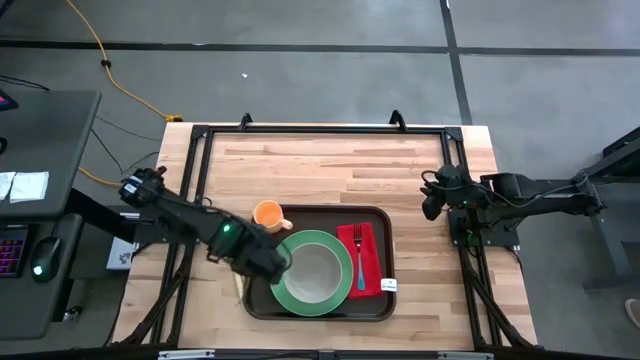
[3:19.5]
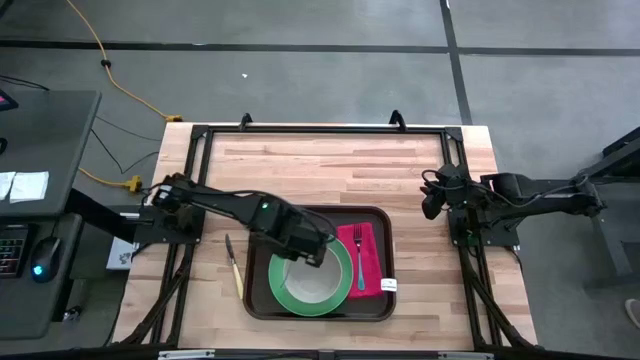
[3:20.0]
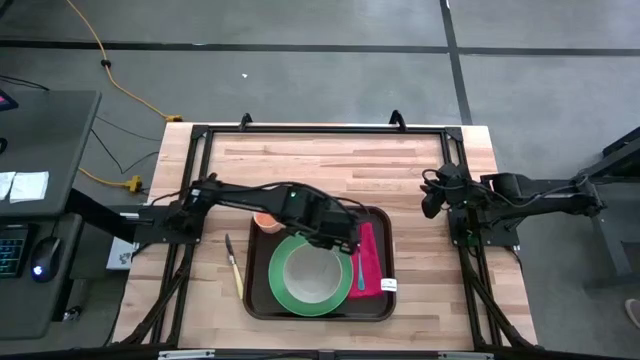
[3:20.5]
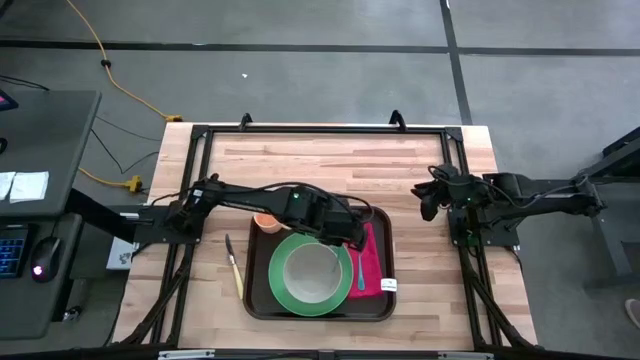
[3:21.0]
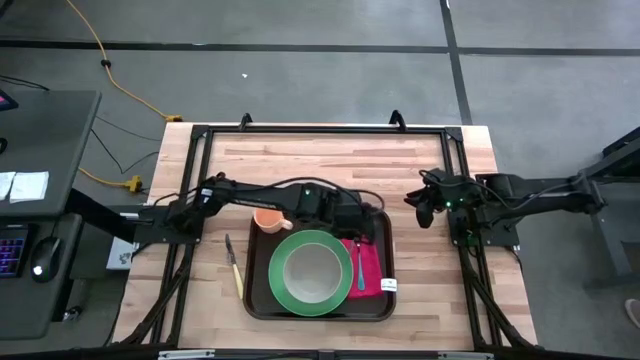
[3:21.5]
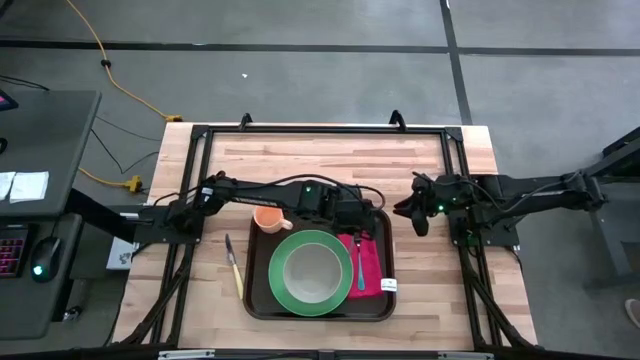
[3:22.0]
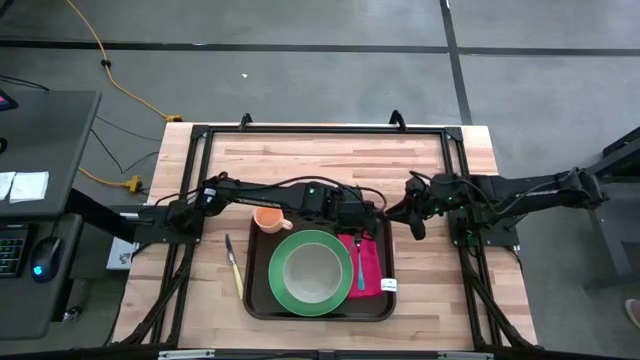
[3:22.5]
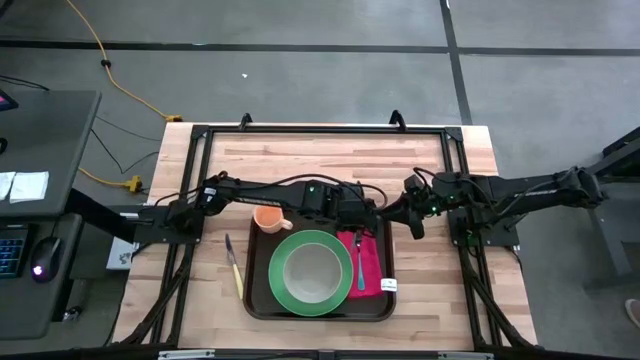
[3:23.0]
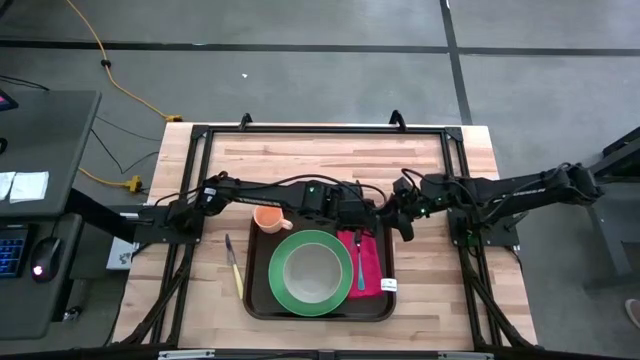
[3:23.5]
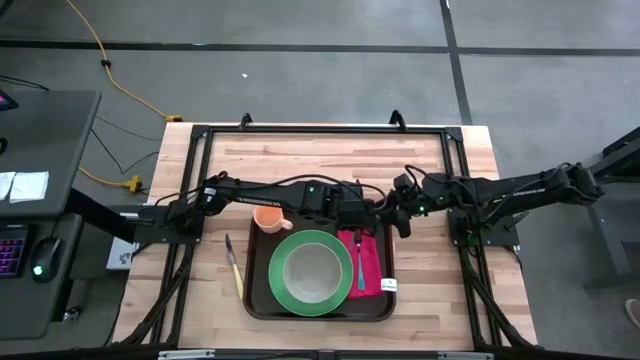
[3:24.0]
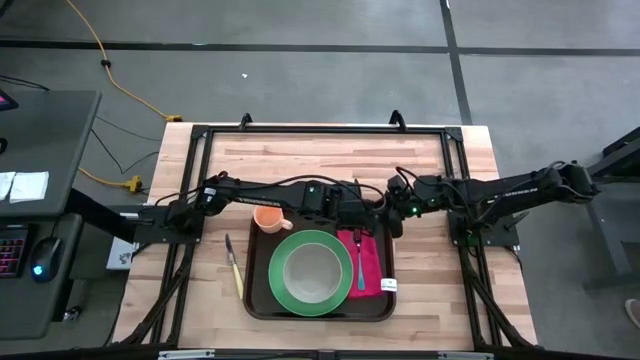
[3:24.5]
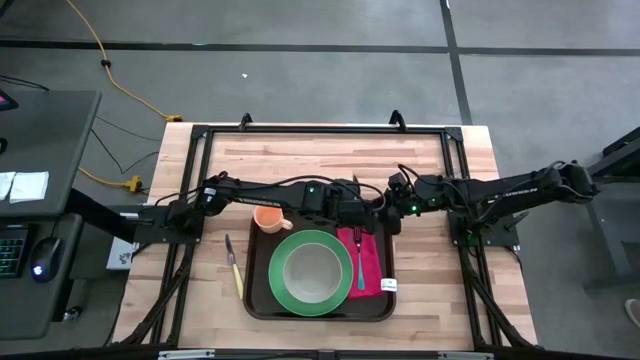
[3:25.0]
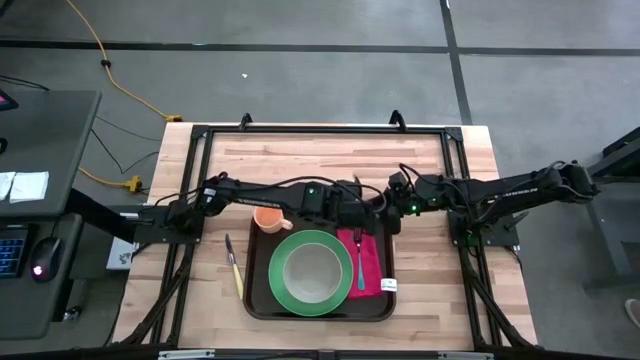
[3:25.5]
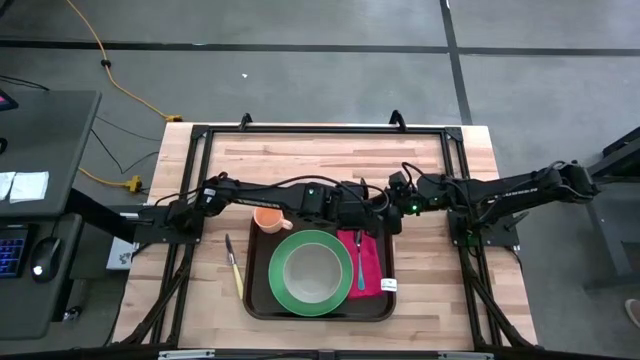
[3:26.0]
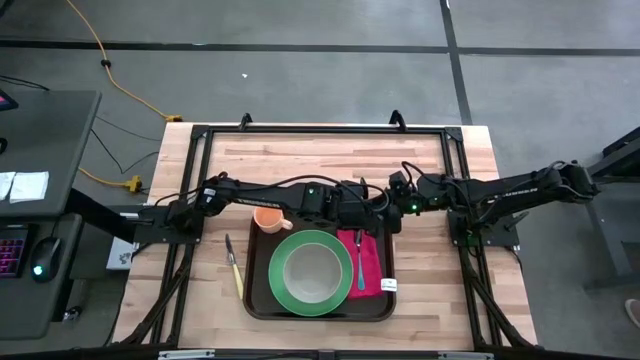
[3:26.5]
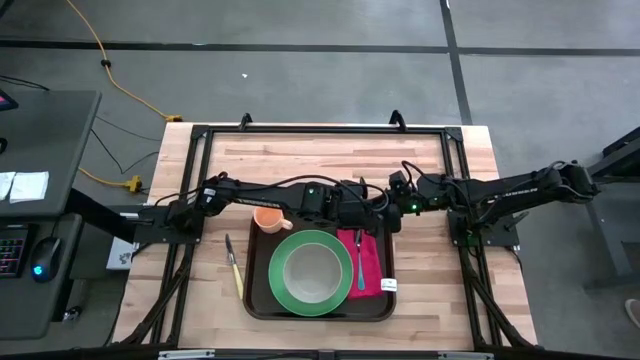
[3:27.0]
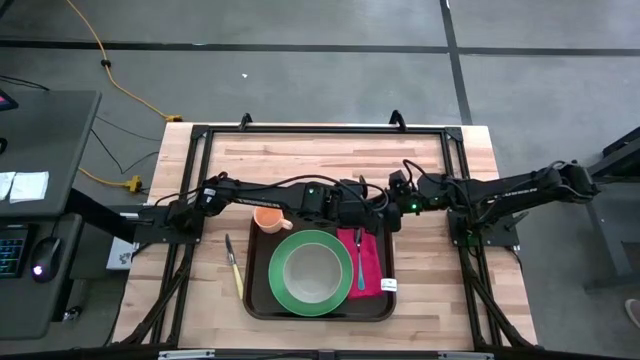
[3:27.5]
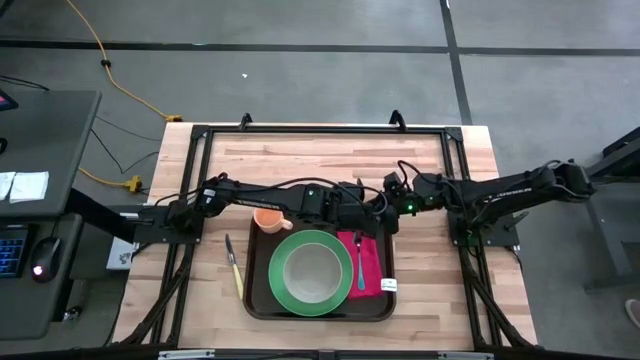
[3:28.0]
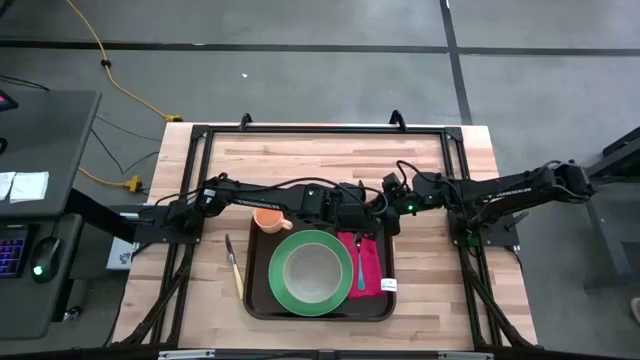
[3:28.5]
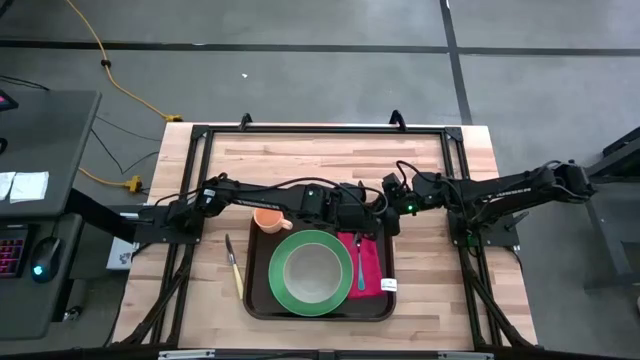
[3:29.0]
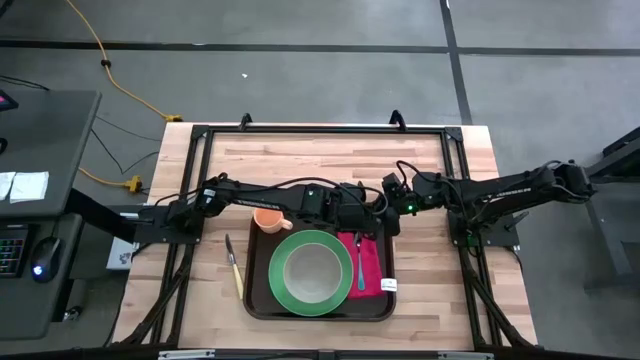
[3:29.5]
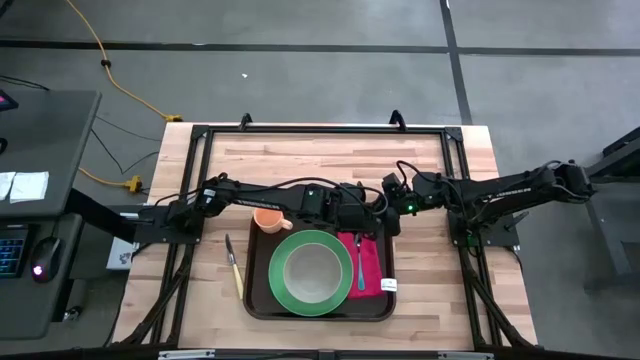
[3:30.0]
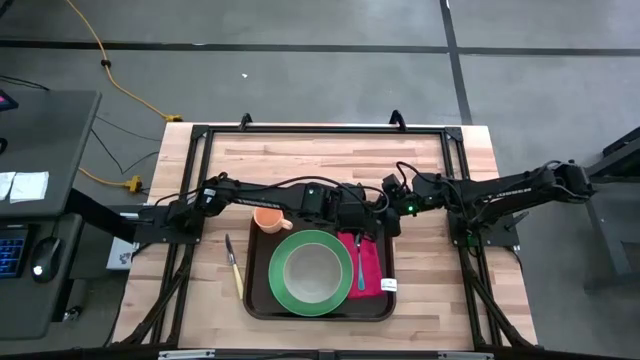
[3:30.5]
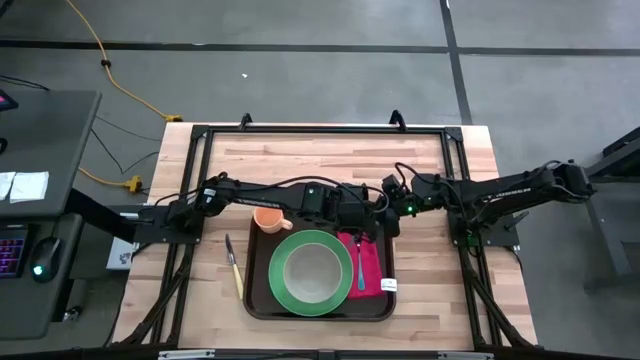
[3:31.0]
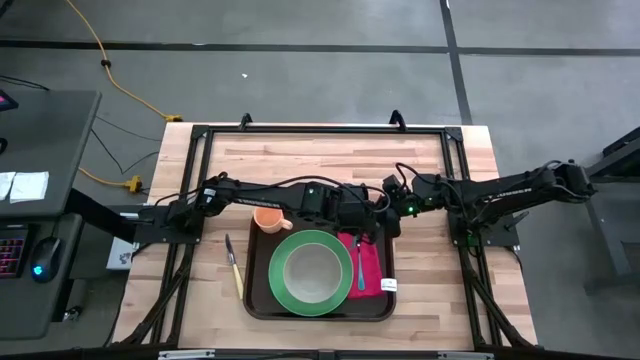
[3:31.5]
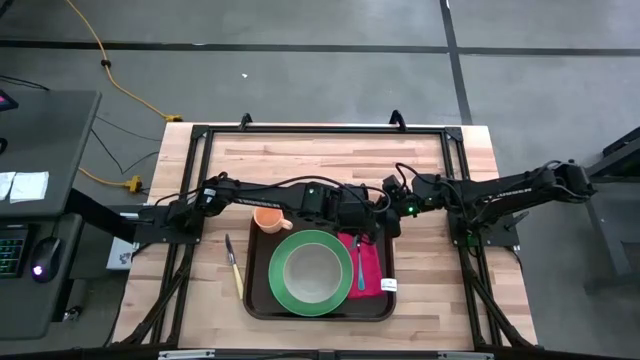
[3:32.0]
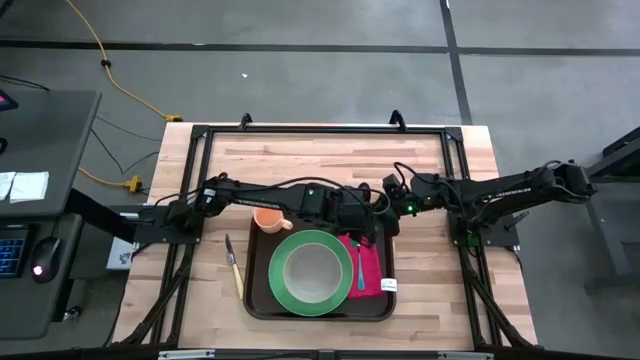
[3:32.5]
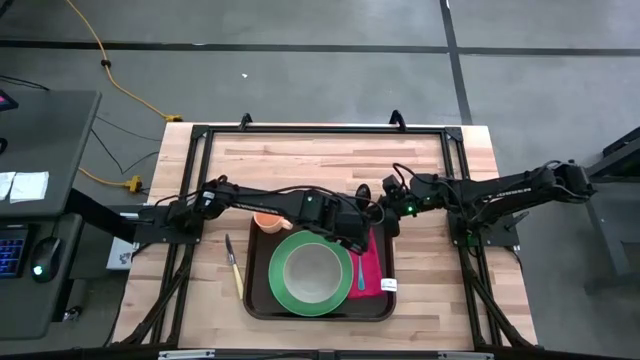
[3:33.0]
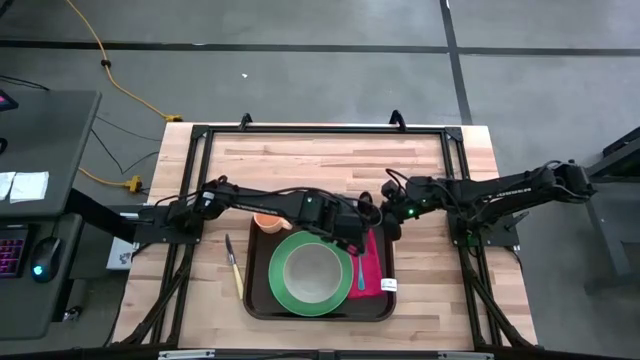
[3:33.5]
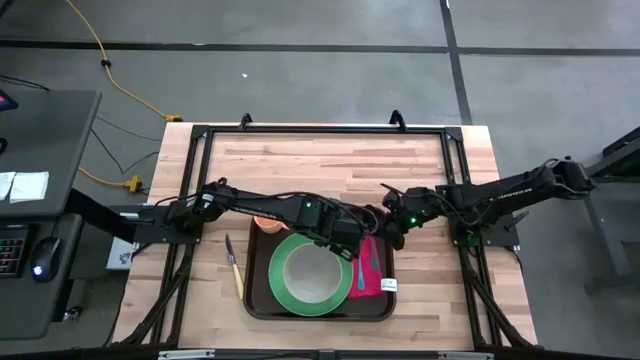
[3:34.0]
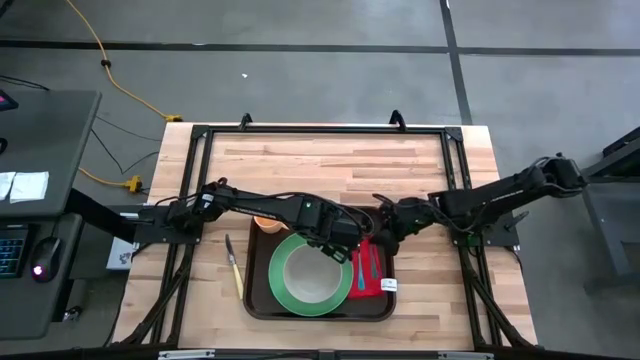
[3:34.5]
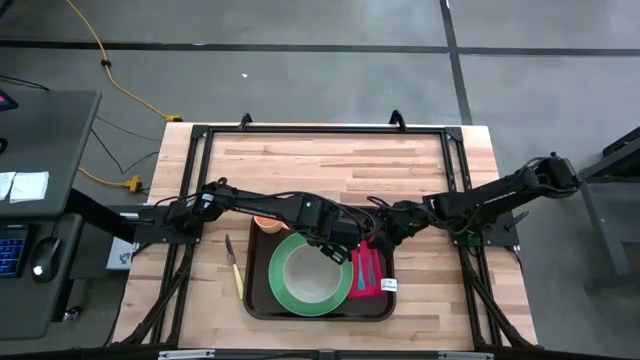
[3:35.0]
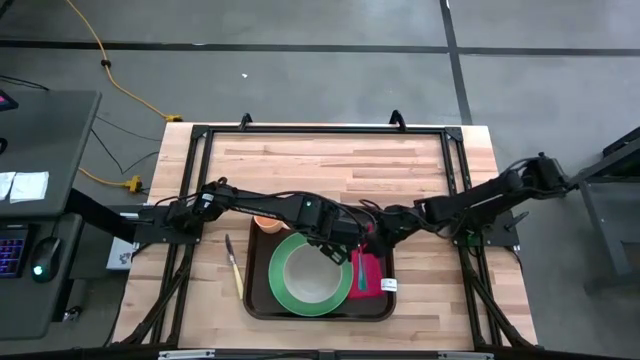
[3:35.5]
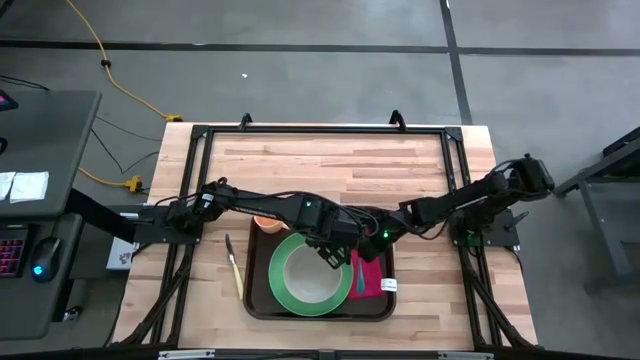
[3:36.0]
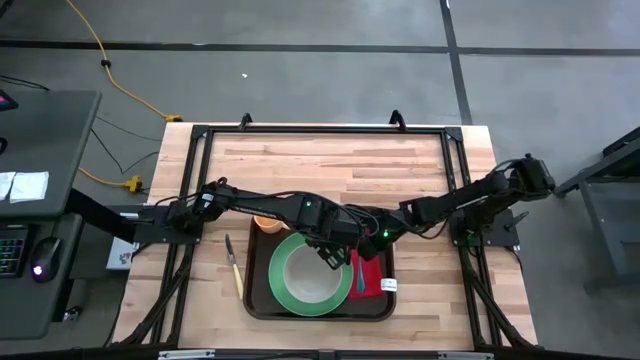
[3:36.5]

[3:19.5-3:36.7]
Task: Set up tray
Put the blue spoon on the red table napkin to the left of the blue fork

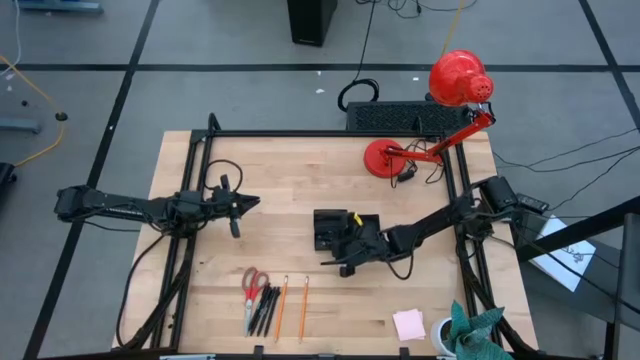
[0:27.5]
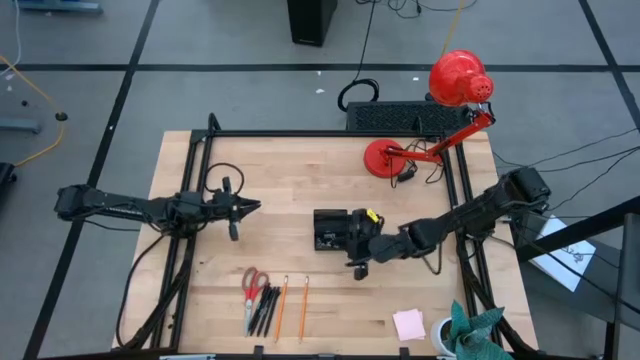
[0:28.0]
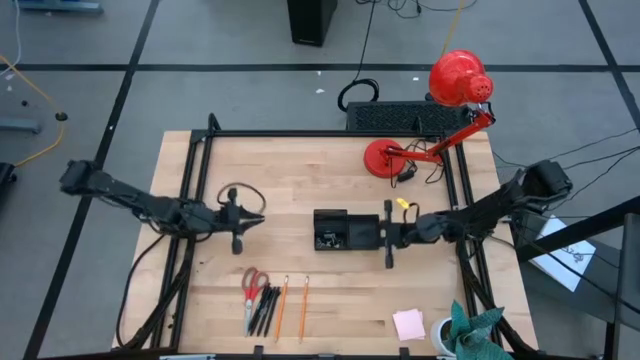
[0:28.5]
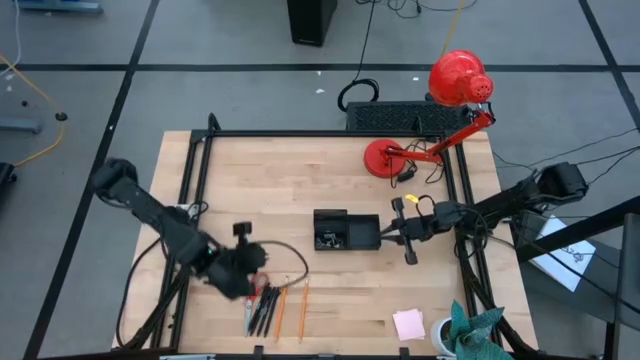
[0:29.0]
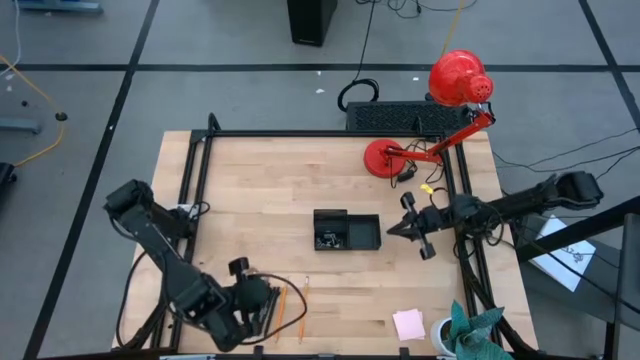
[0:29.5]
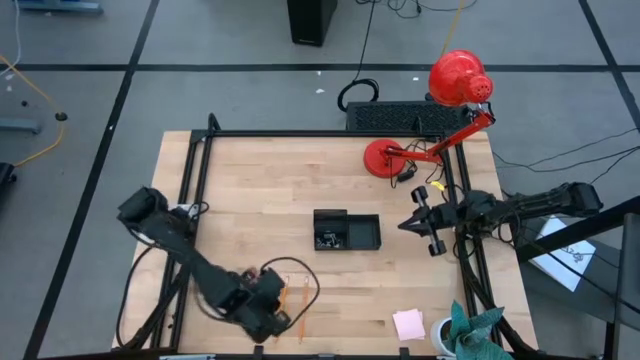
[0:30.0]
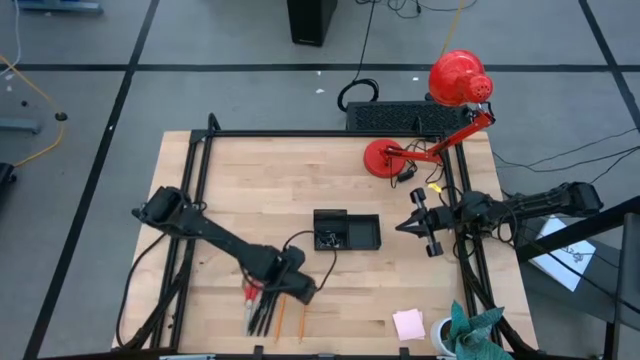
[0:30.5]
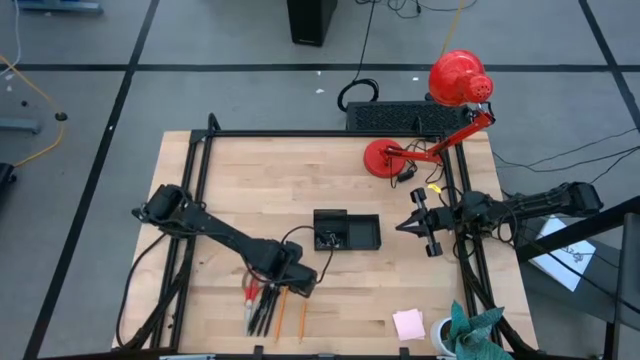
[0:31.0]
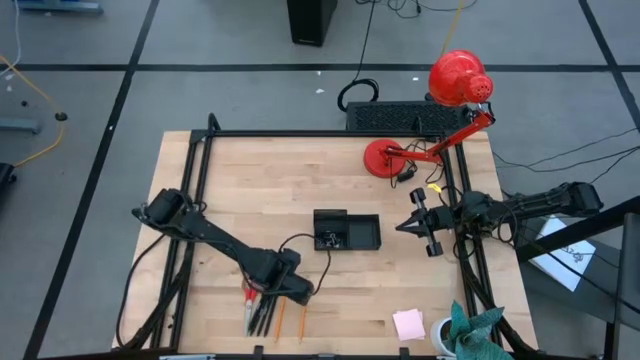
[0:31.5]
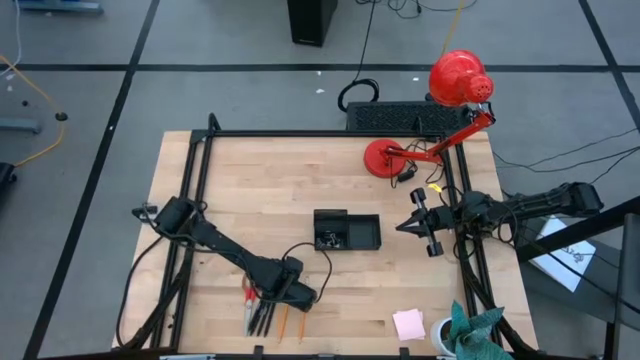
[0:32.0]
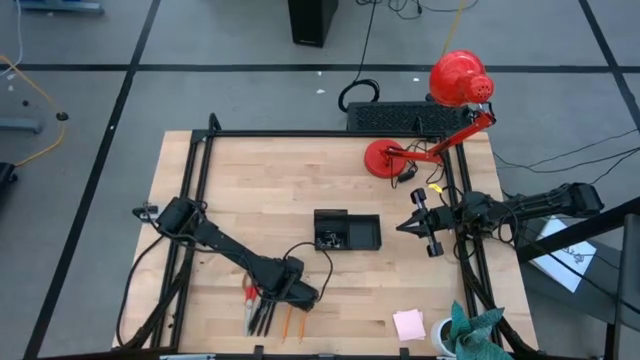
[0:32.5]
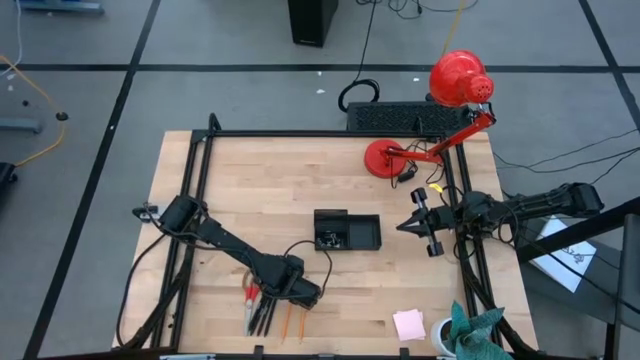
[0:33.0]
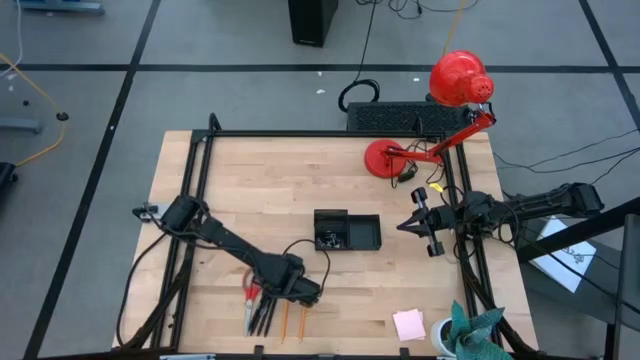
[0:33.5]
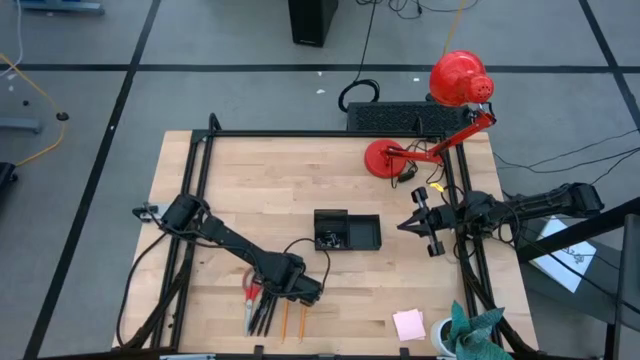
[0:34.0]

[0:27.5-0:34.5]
Task: Pick and place office supplies into organizer
Put the left orange pencil into the desk organizer
